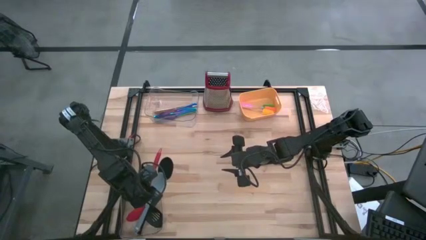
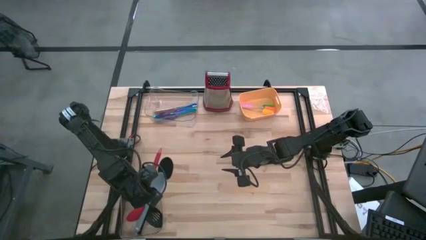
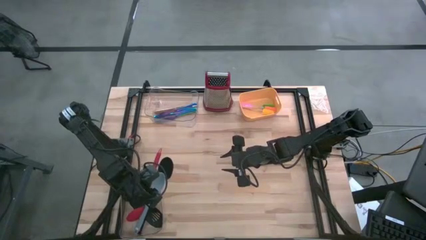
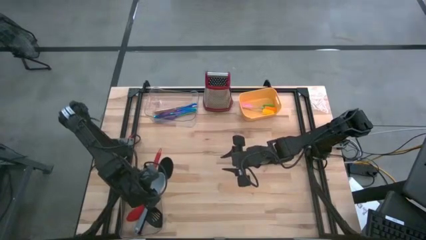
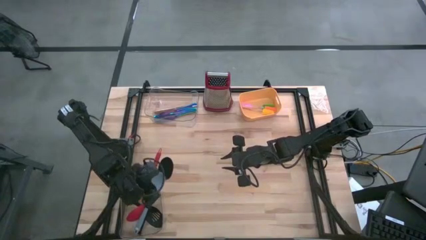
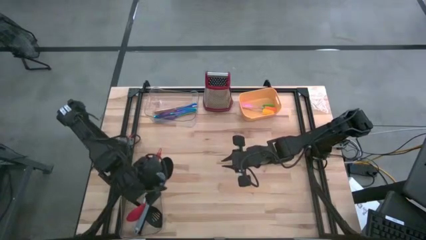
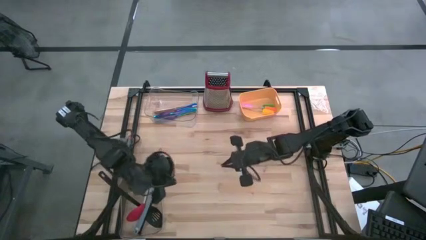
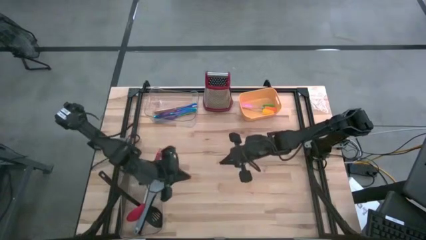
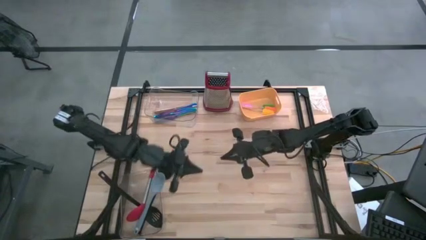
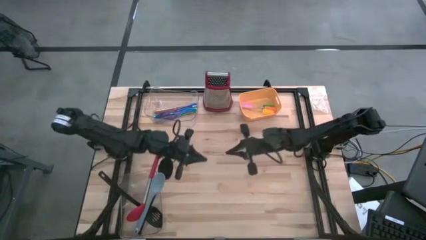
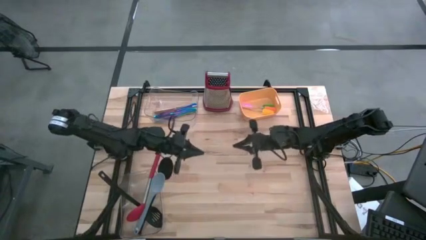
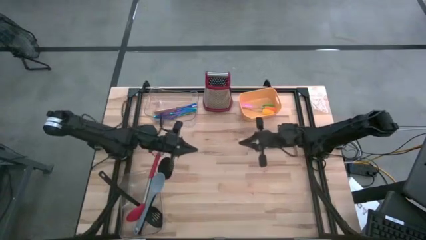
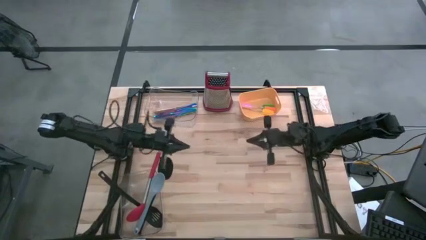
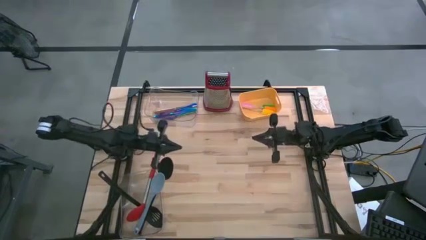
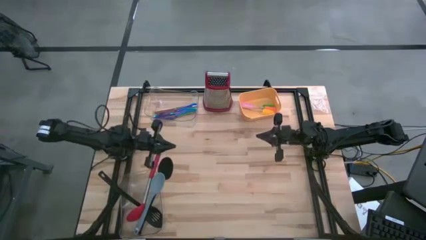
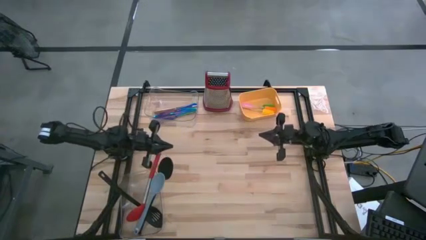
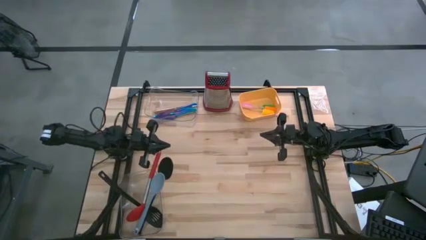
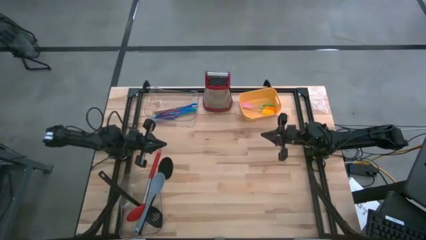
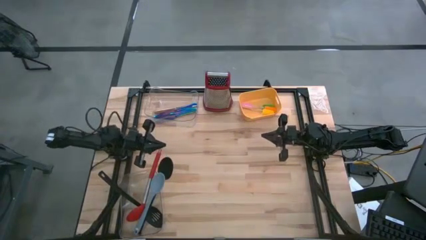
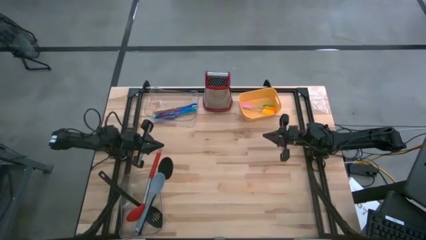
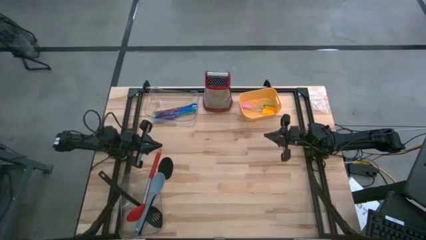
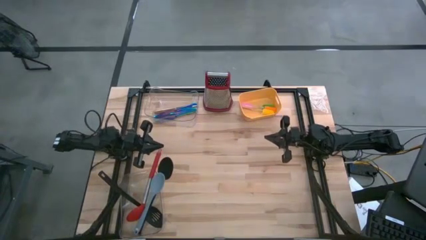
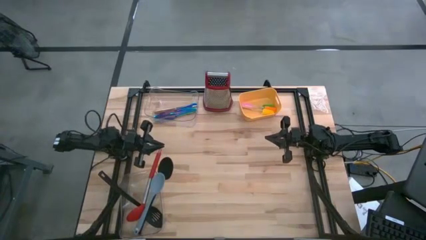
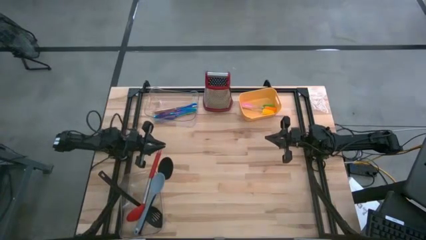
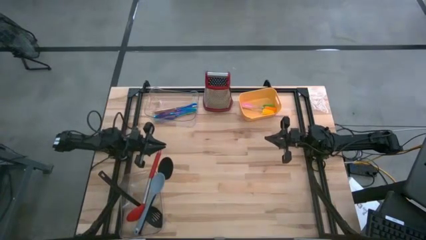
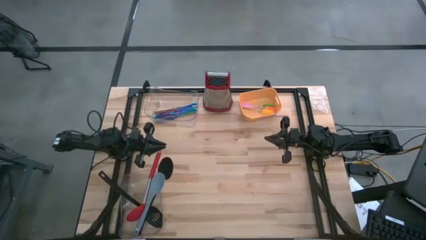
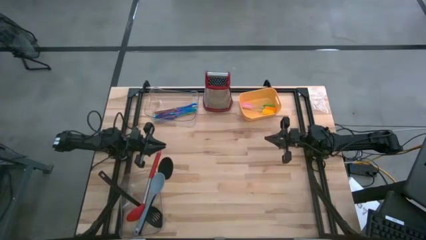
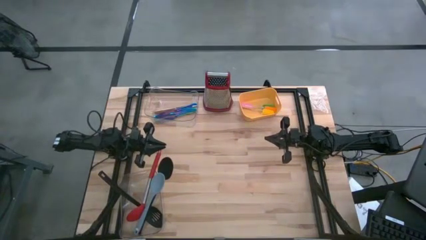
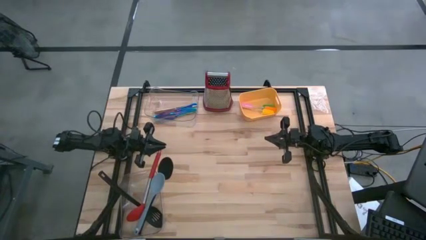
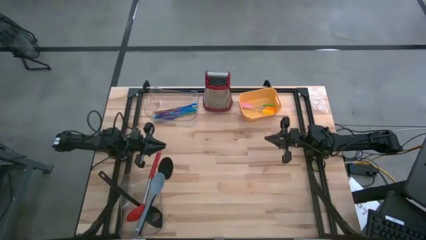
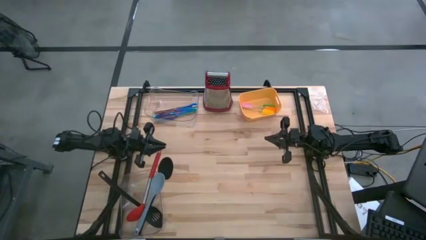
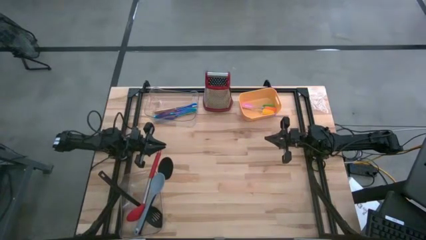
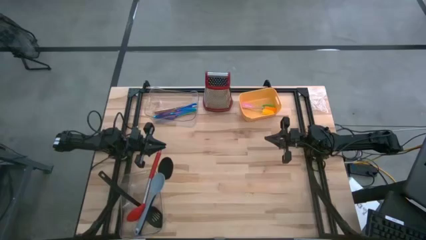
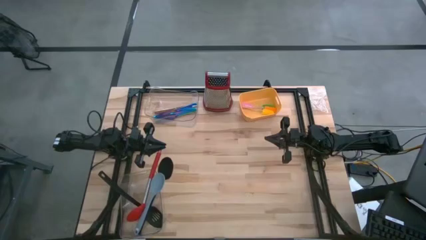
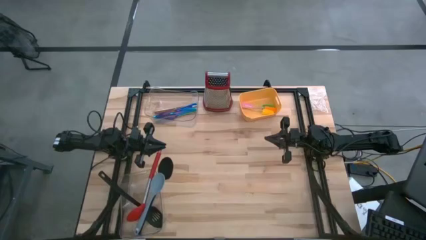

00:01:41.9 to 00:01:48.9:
Task: Pick & Place Kitchen Items
Return To Home Position

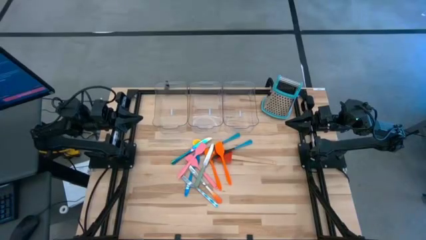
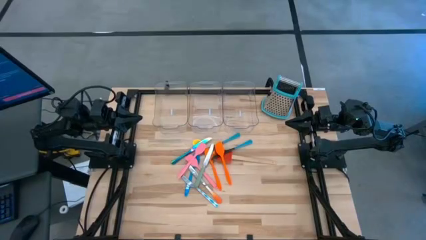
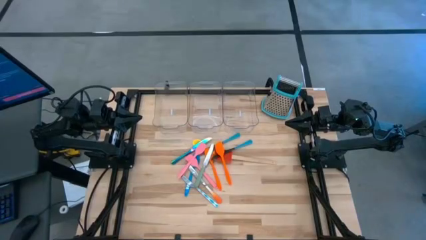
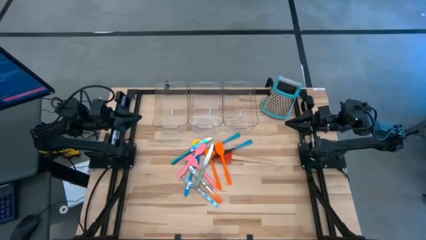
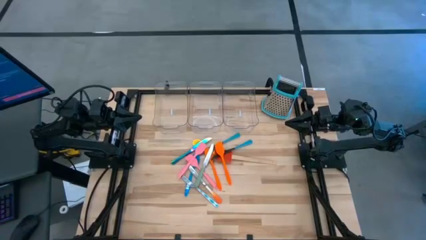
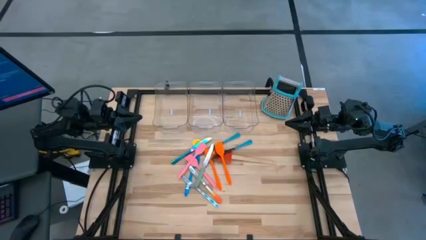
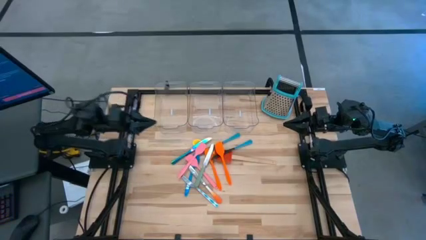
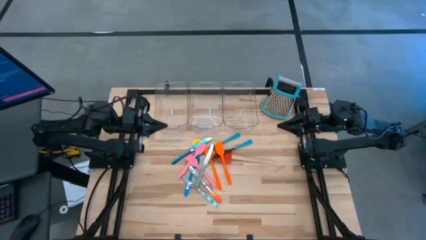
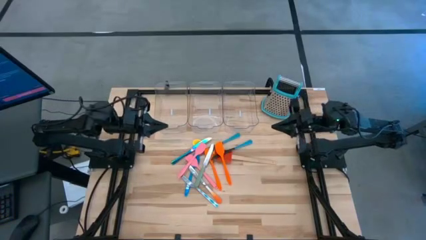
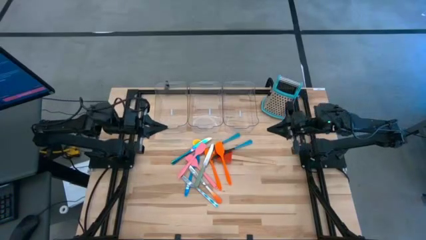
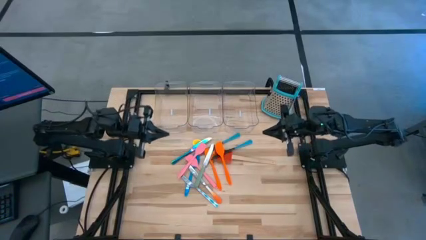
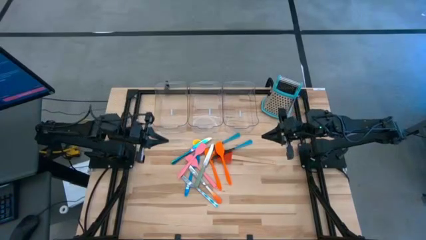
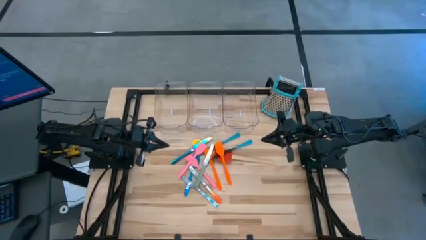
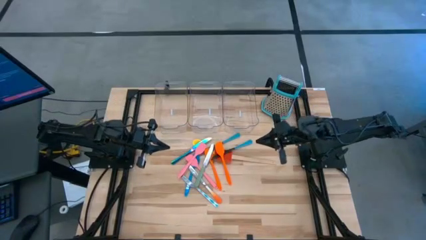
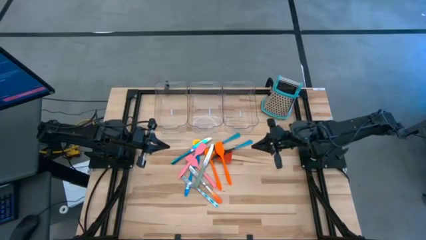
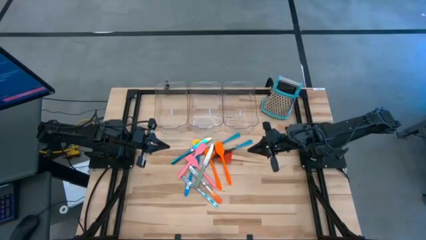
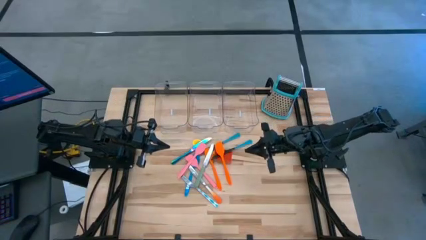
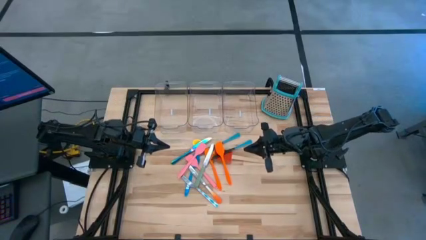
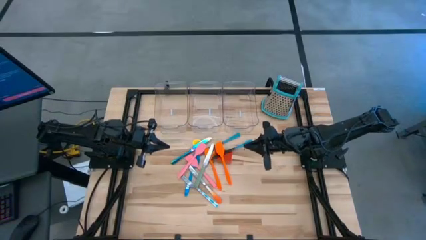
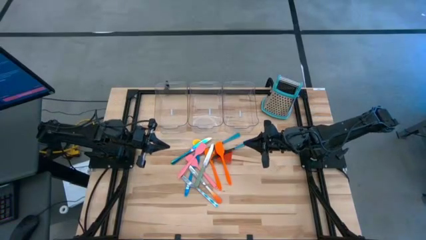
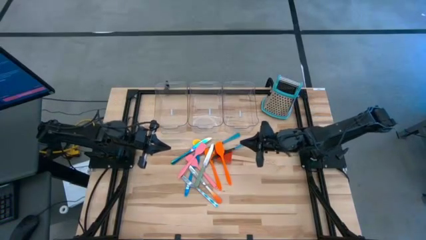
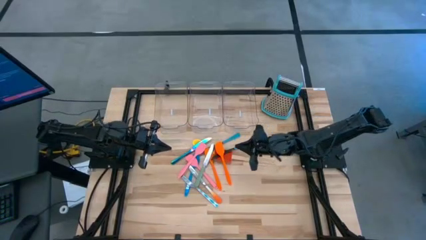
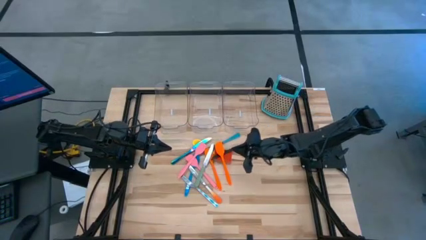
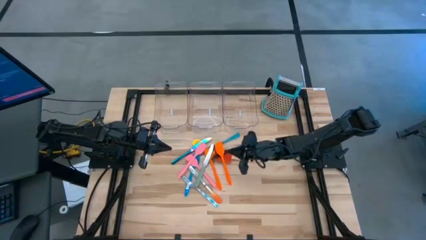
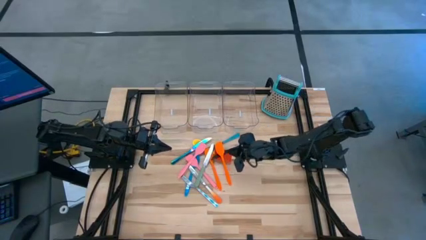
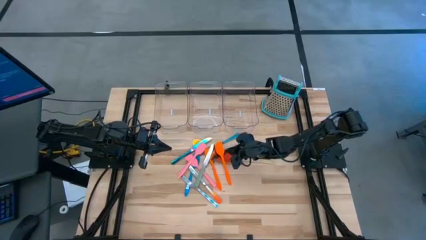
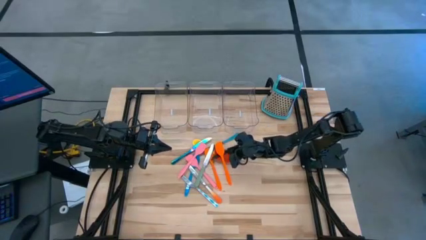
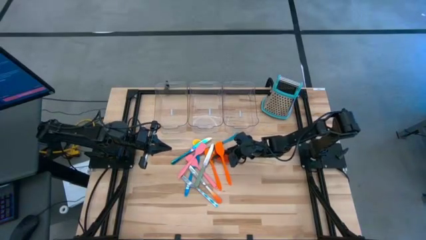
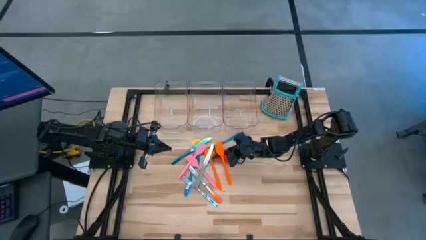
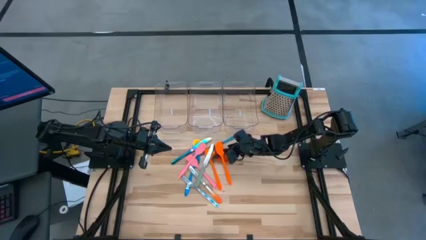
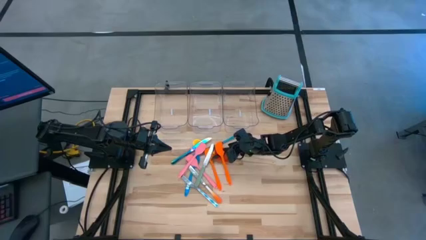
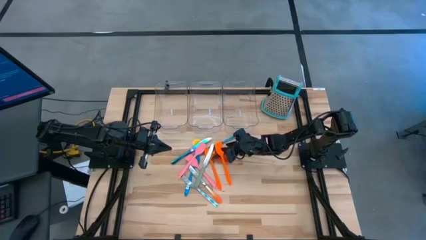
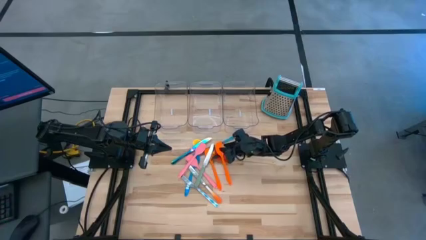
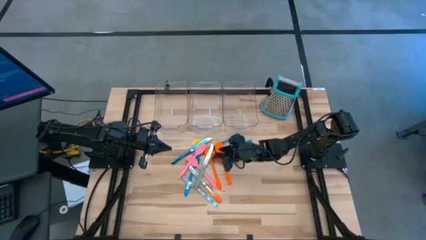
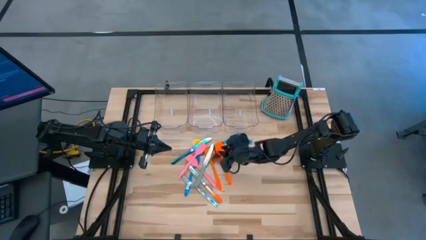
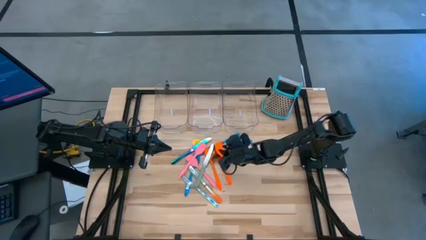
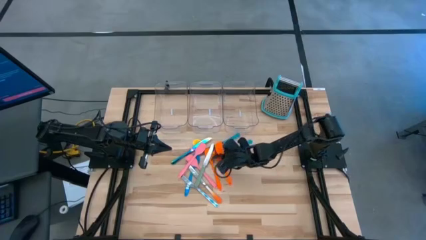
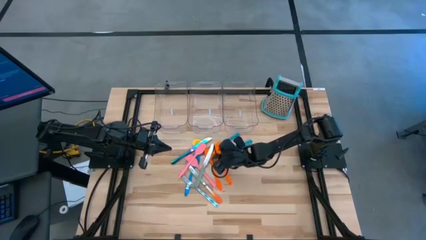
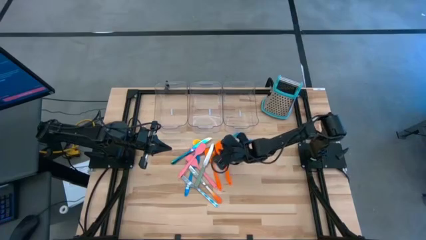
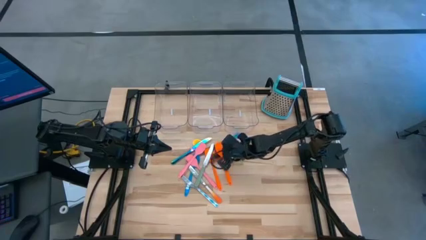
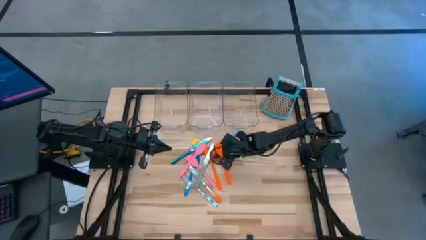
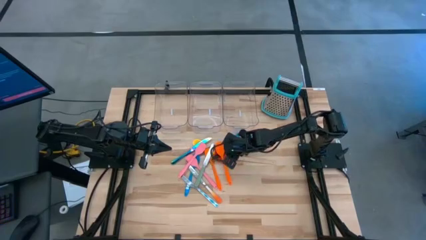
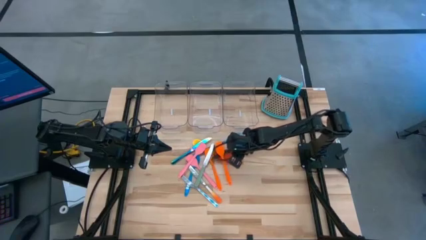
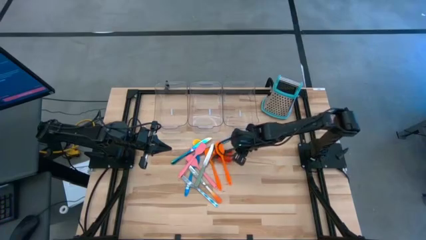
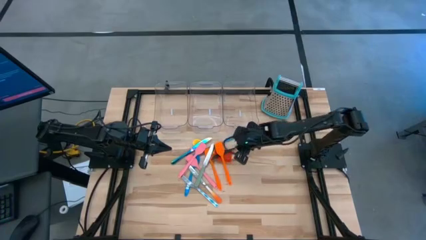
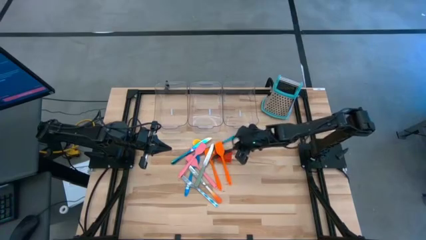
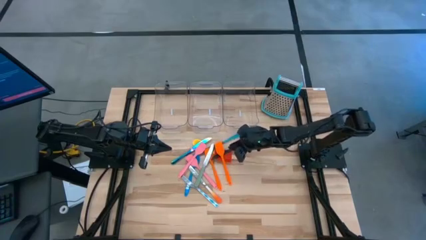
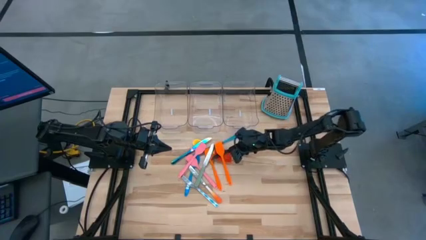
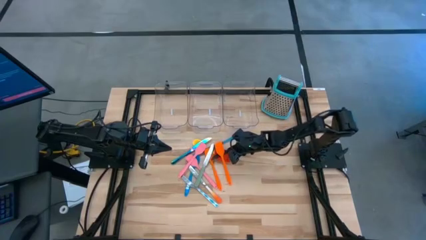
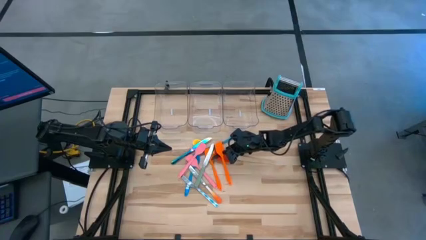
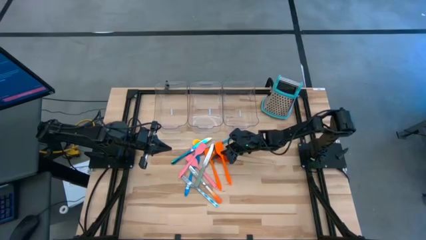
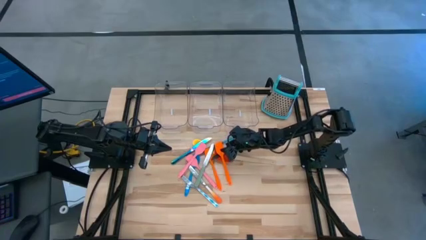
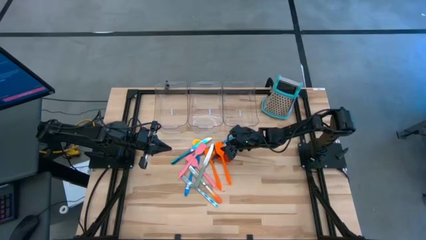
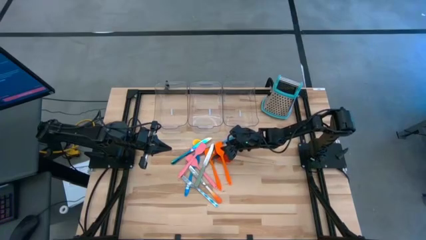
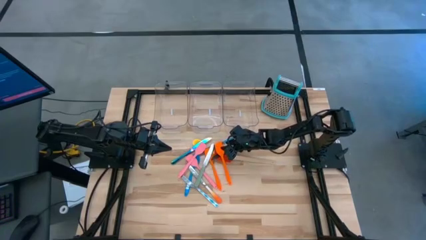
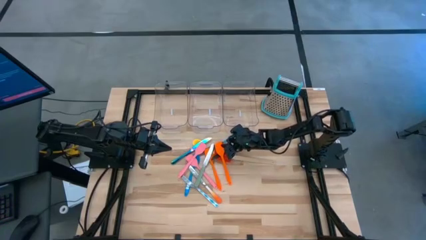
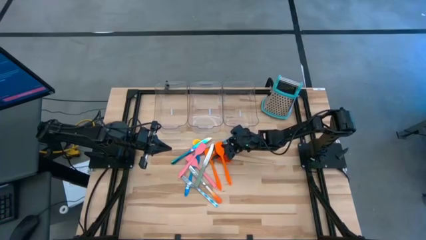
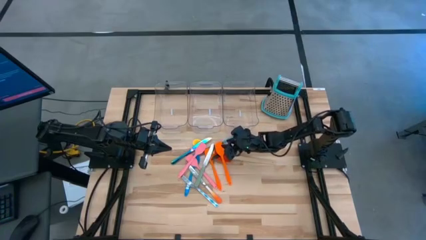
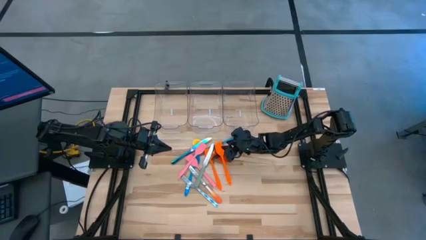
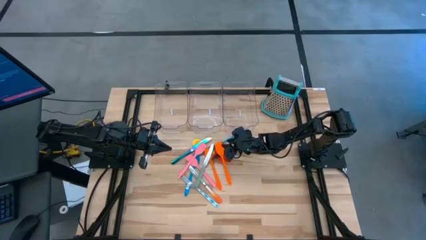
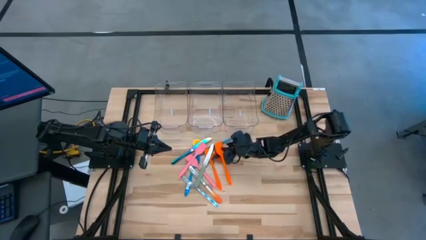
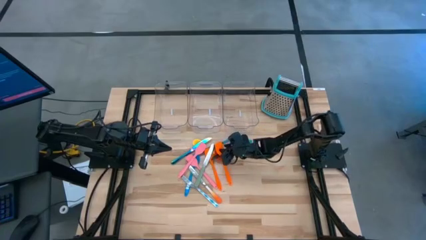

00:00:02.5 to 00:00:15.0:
Task: Pick & Place Kitchen Items
Put the right orange spatula into the left transparent bin
